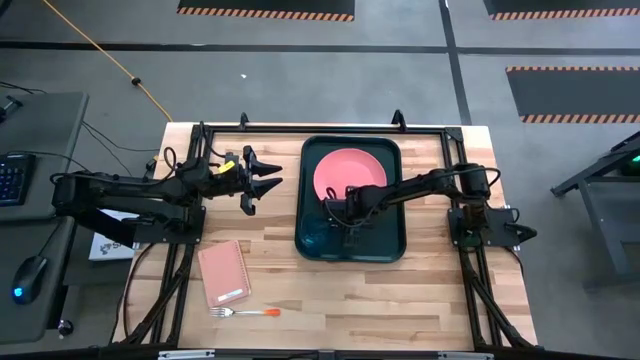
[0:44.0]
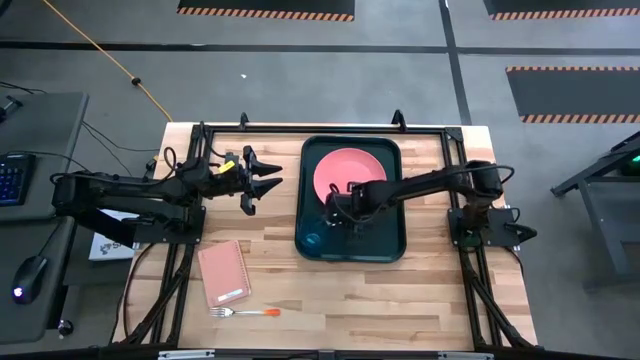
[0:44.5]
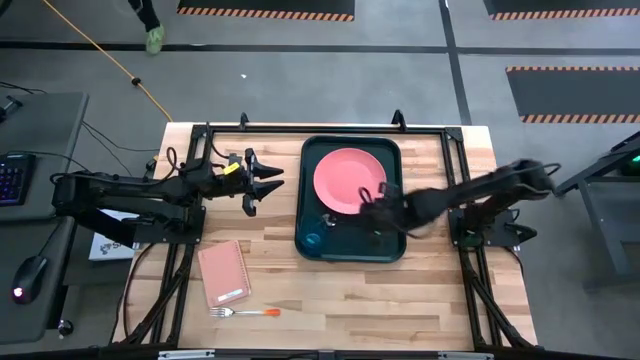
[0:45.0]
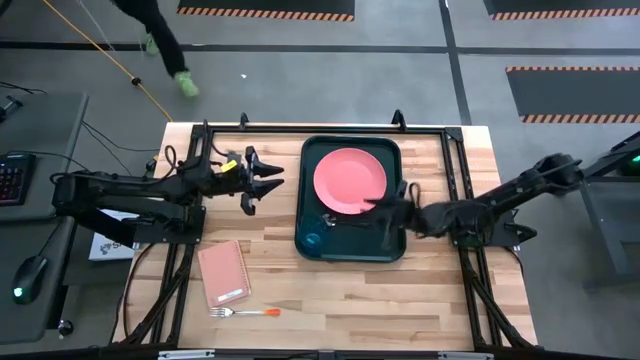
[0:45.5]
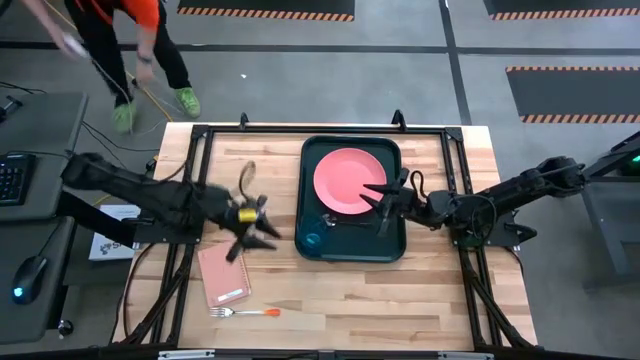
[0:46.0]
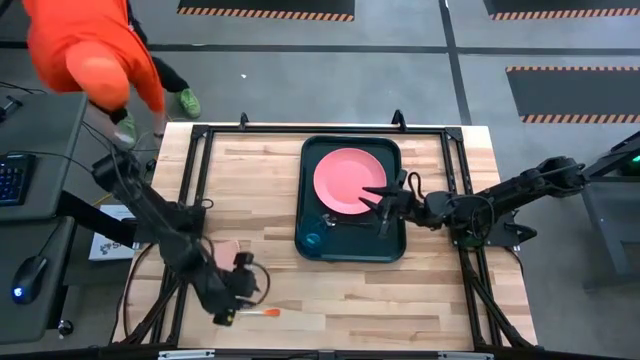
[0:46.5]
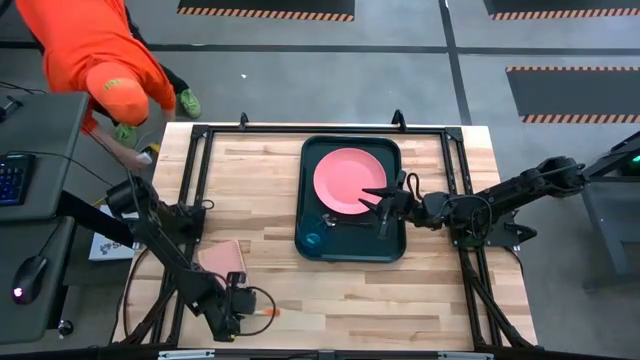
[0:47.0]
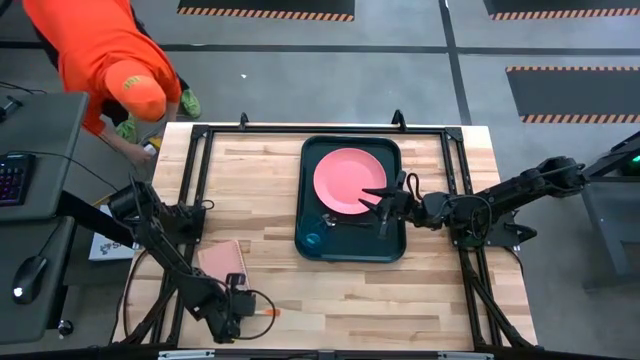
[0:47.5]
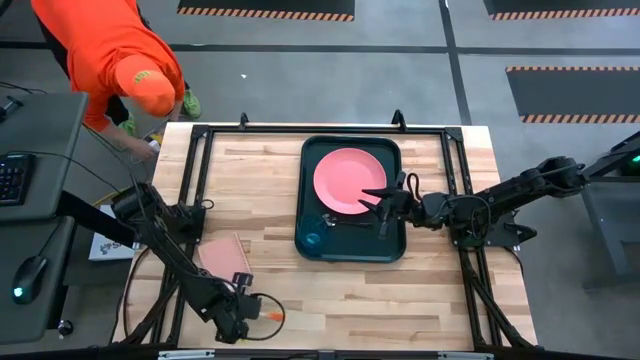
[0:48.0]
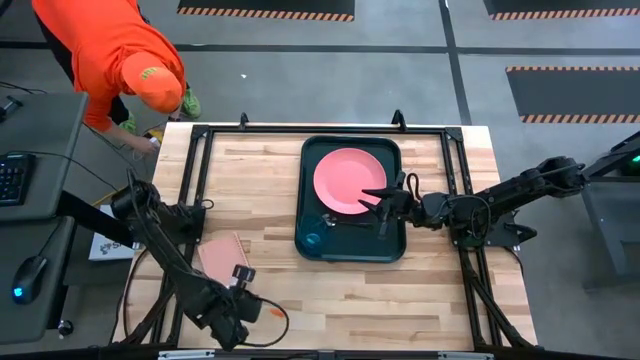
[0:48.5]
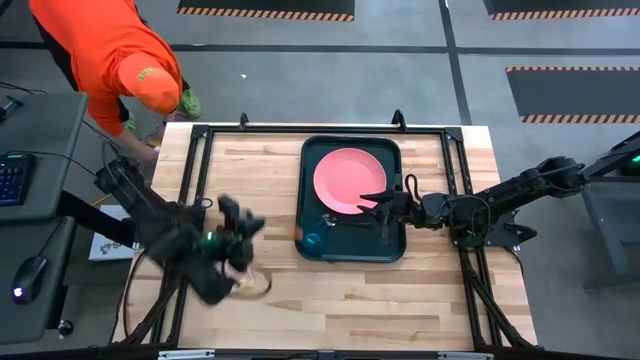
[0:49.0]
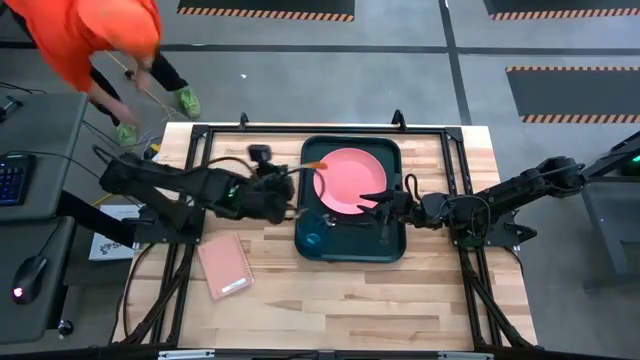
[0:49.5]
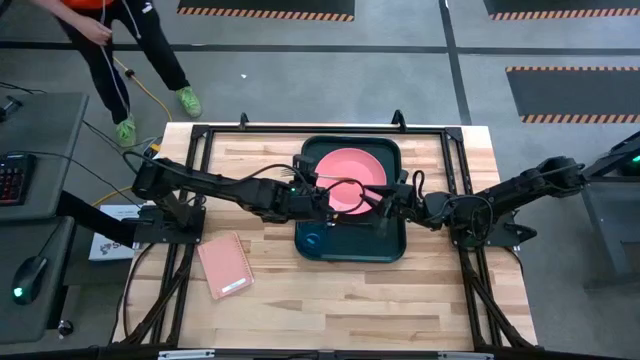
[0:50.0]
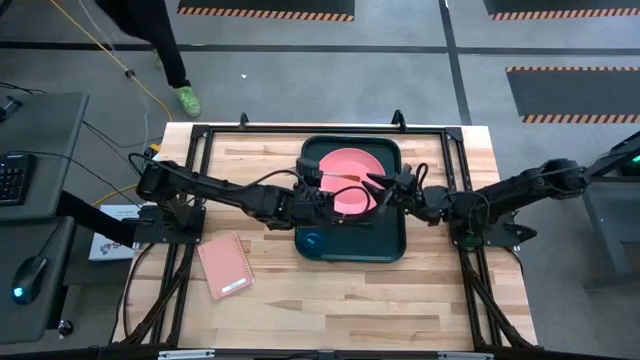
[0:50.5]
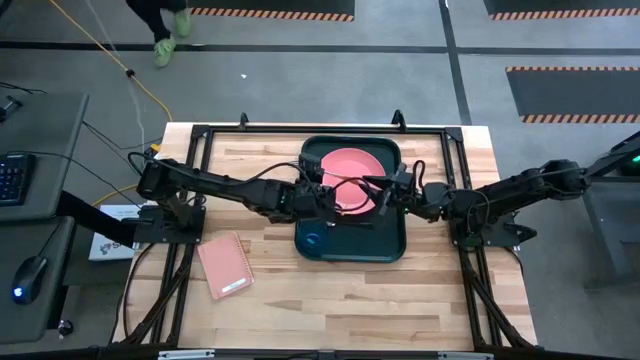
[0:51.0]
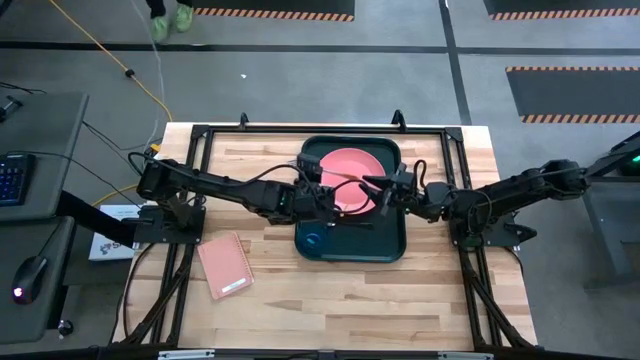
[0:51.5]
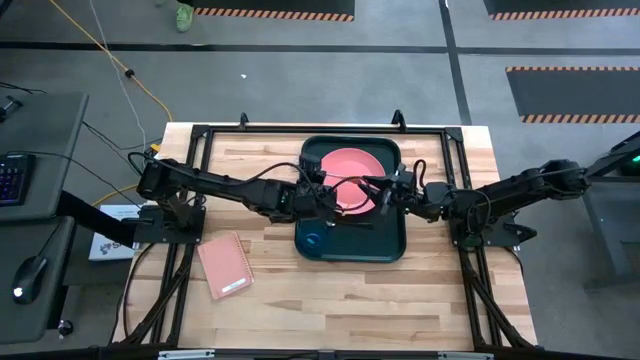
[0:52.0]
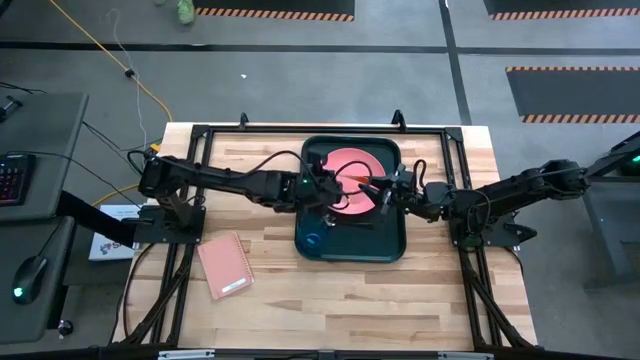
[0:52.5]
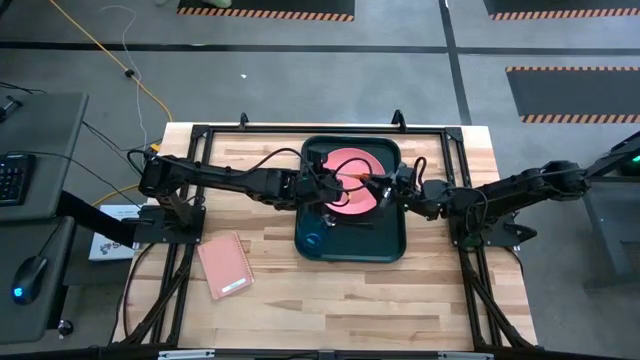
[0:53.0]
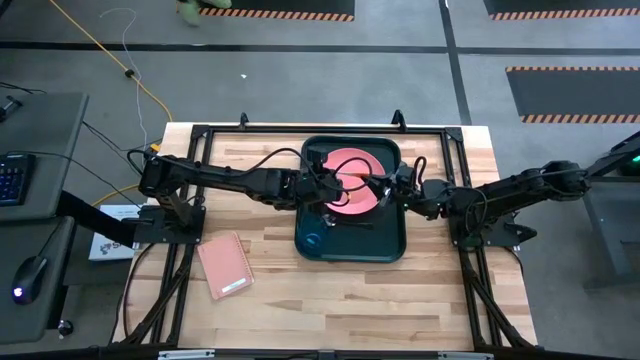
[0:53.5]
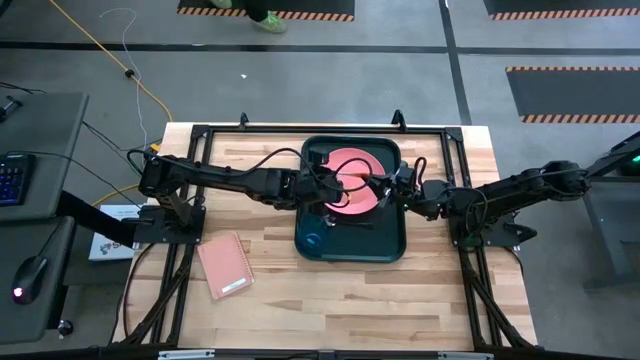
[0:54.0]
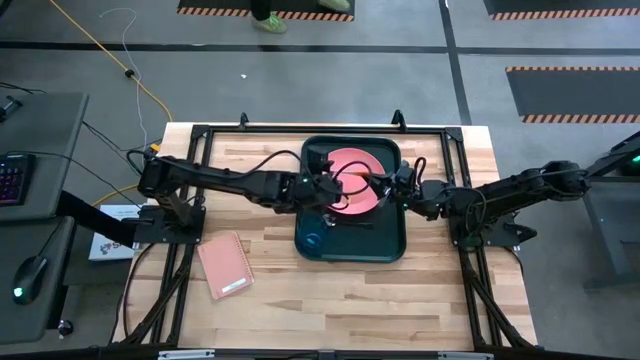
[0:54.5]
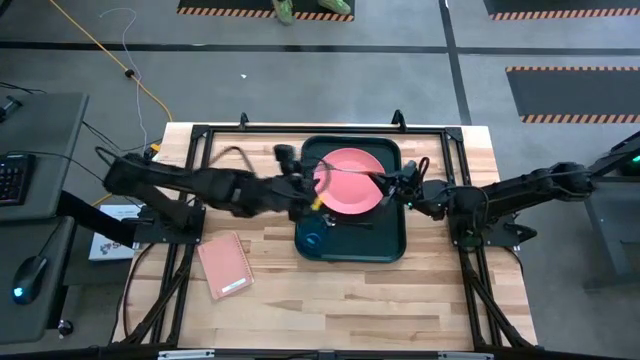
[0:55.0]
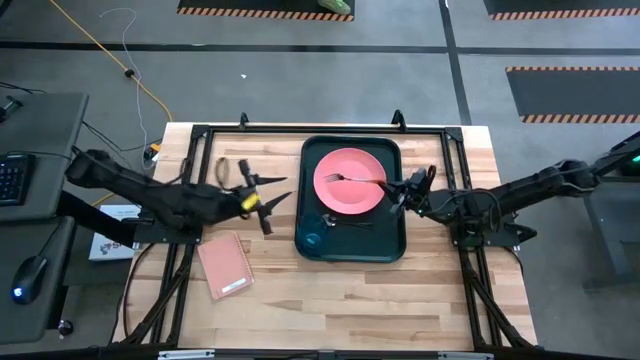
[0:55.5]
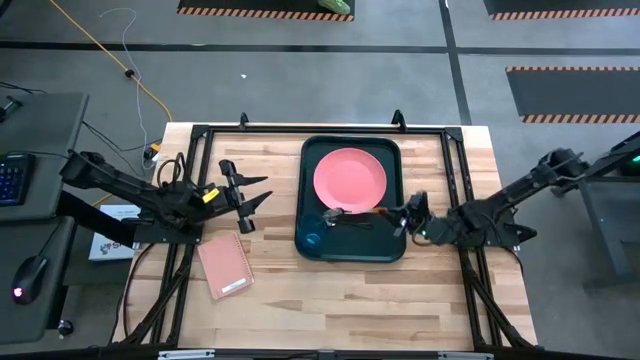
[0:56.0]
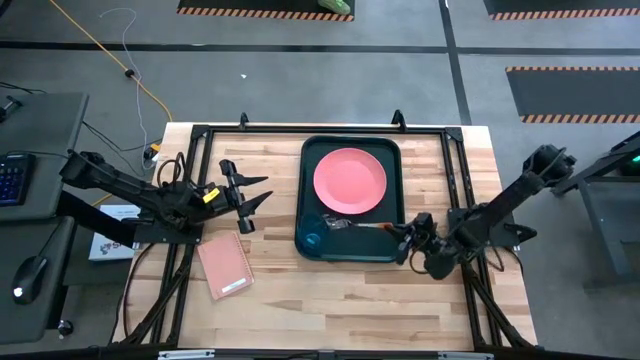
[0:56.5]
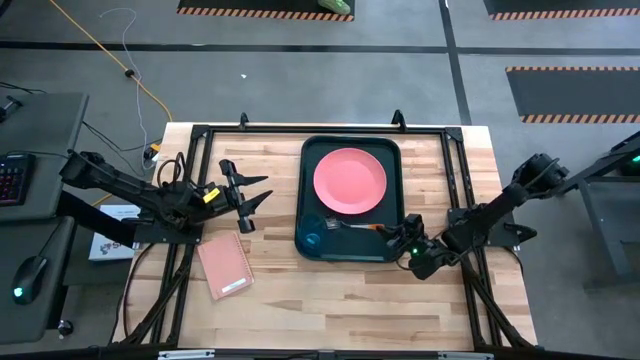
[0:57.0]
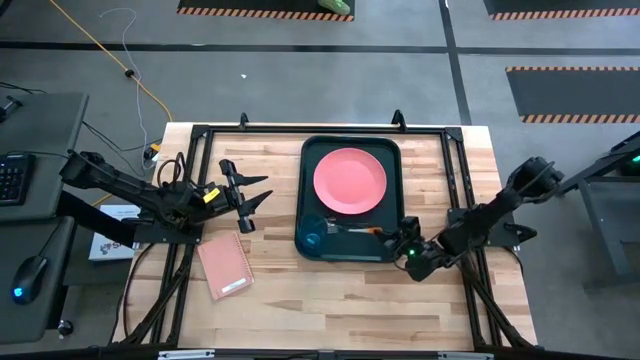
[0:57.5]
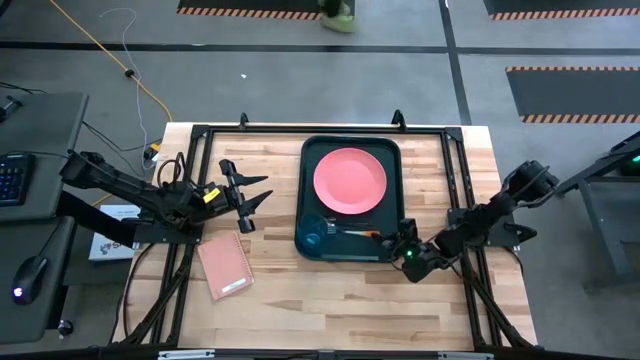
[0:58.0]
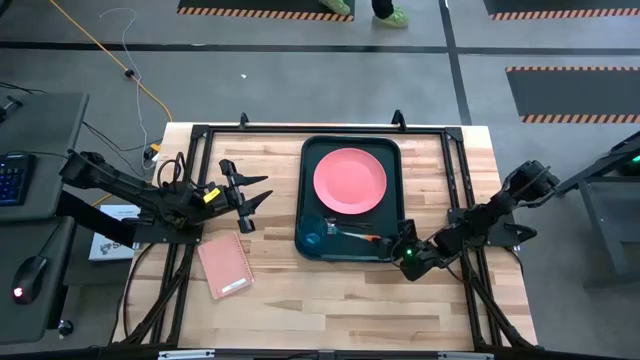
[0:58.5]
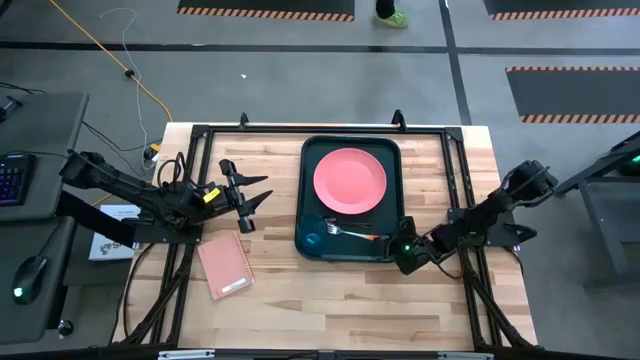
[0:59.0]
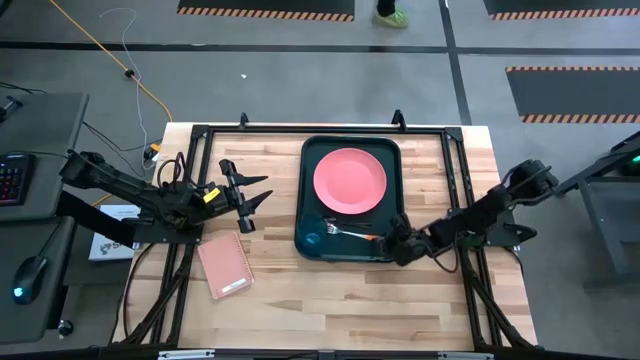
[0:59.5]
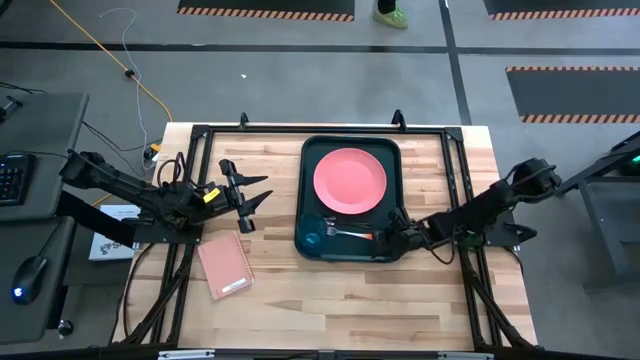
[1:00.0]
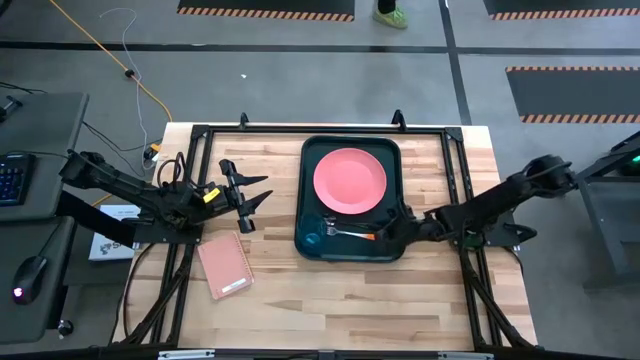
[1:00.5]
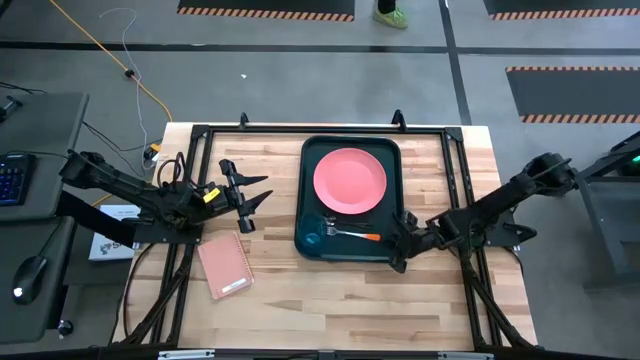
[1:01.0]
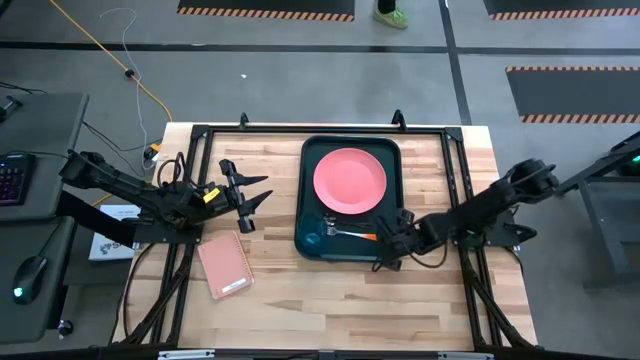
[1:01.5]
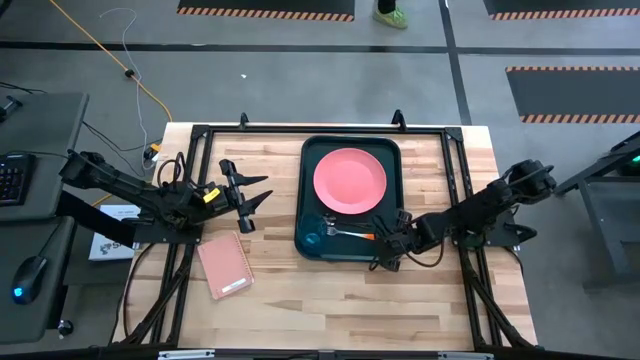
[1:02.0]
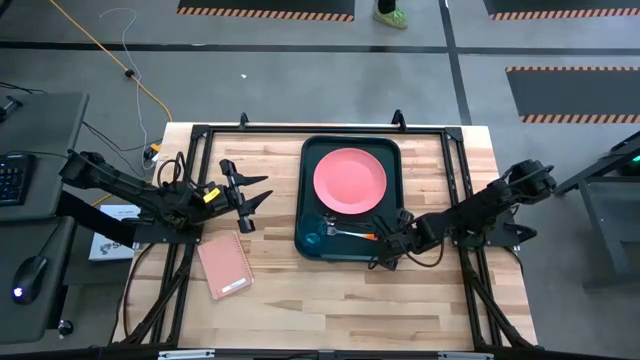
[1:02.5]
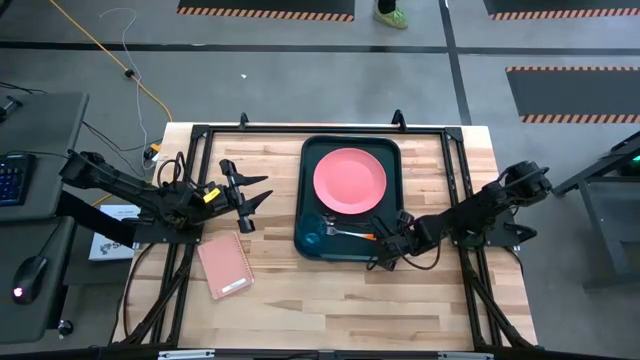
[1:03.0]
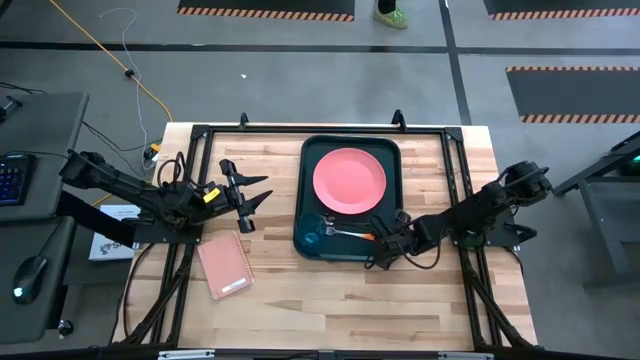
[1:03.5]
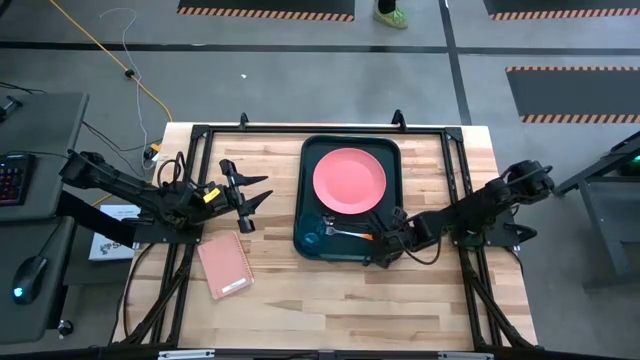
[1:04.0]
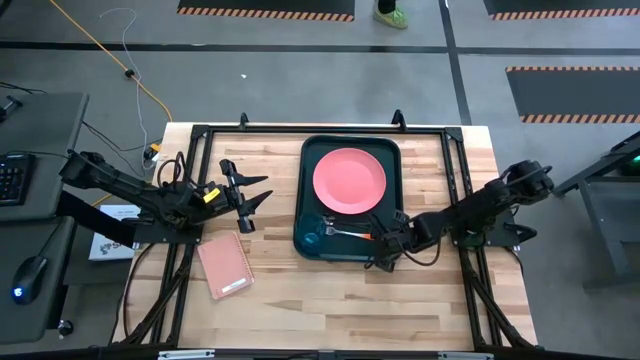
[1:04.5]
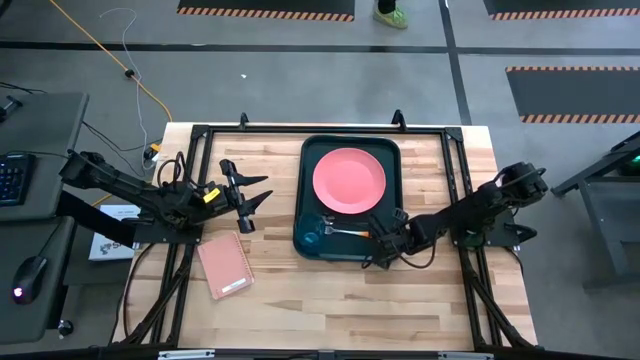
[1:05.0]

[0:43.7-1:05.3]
Task: Pick and place plate/cup/fork/spoon on tray
Put the orange fork on the black table tray to the bottom of the black spoon
